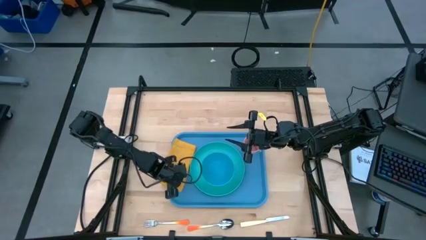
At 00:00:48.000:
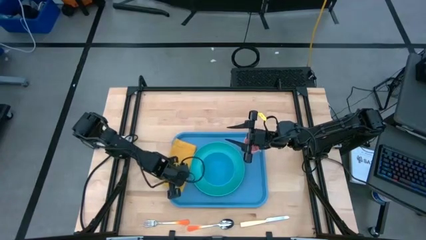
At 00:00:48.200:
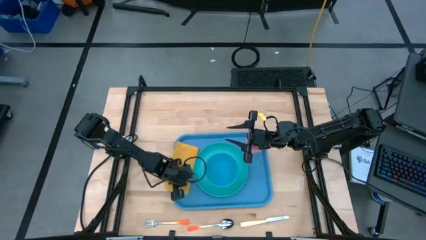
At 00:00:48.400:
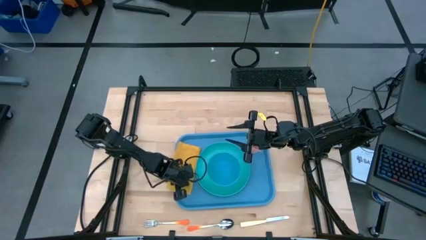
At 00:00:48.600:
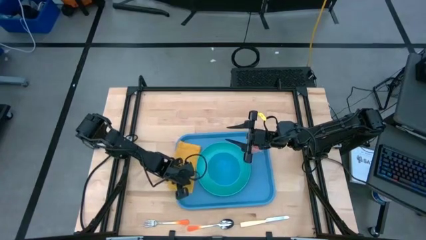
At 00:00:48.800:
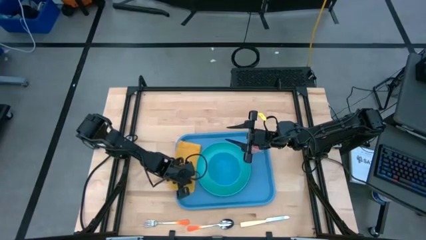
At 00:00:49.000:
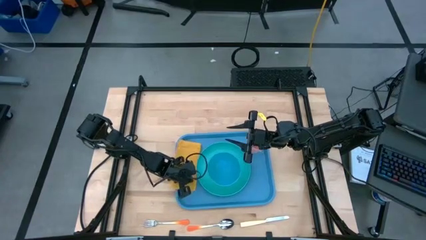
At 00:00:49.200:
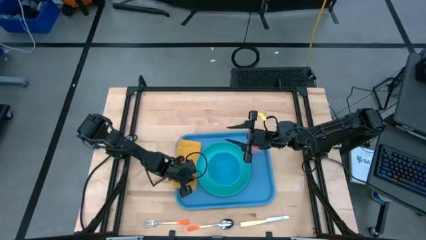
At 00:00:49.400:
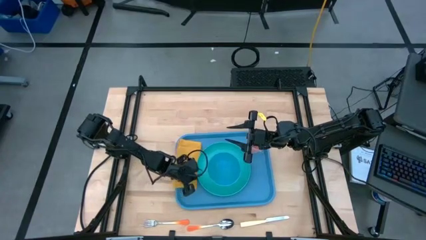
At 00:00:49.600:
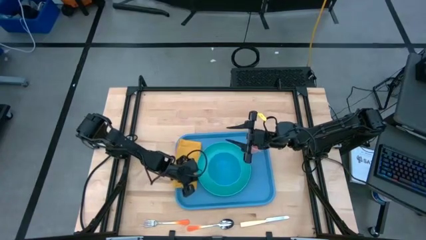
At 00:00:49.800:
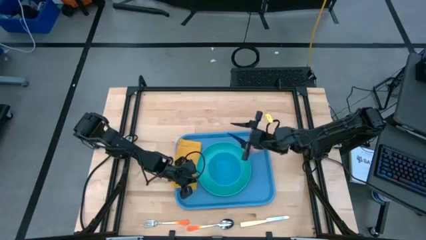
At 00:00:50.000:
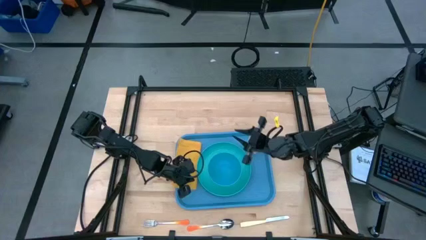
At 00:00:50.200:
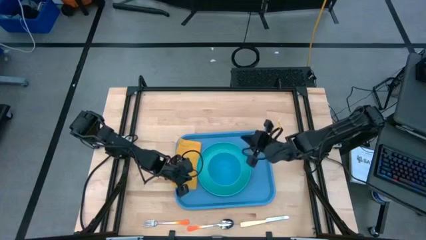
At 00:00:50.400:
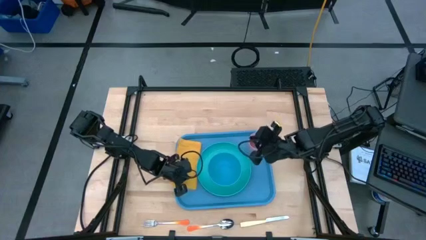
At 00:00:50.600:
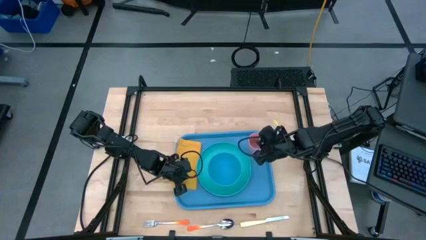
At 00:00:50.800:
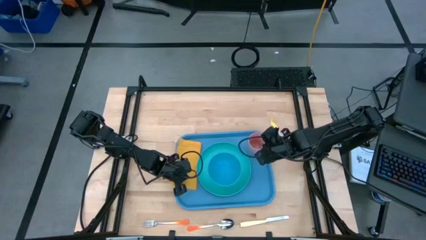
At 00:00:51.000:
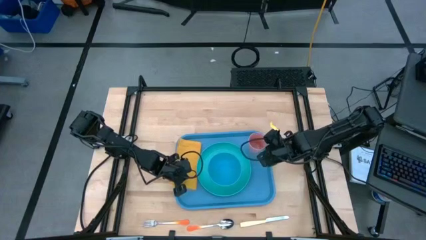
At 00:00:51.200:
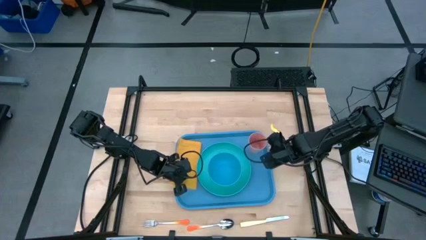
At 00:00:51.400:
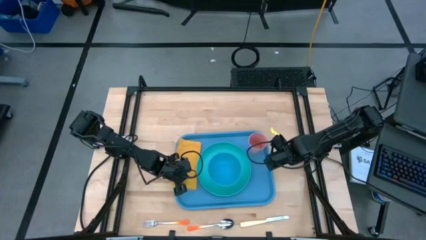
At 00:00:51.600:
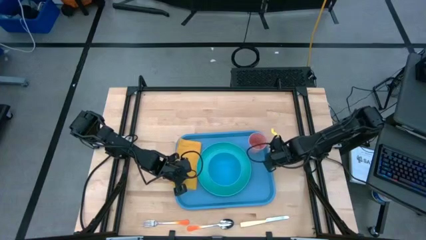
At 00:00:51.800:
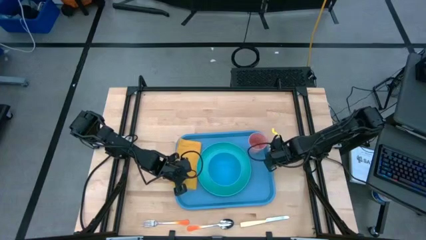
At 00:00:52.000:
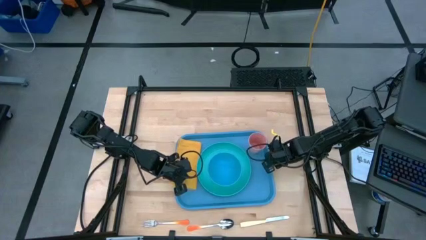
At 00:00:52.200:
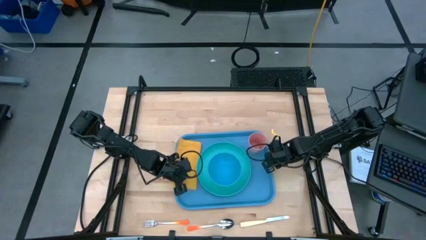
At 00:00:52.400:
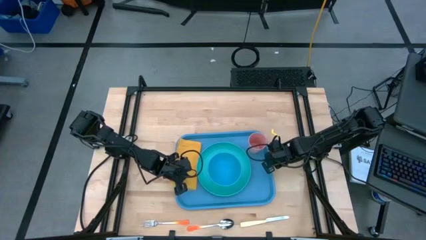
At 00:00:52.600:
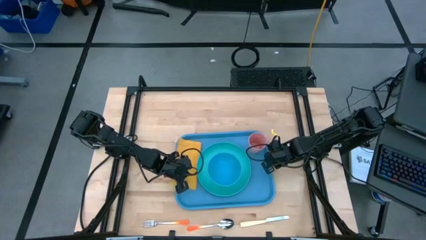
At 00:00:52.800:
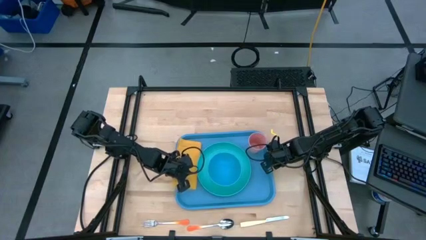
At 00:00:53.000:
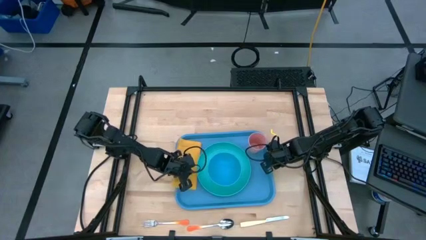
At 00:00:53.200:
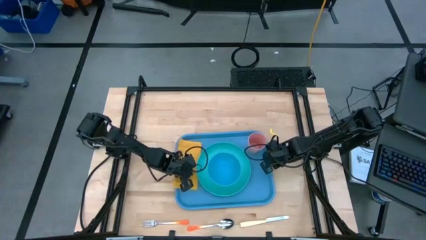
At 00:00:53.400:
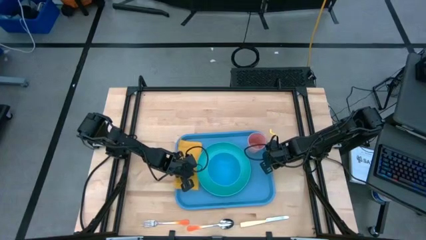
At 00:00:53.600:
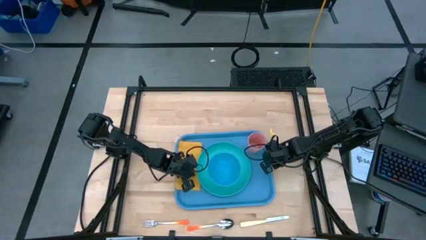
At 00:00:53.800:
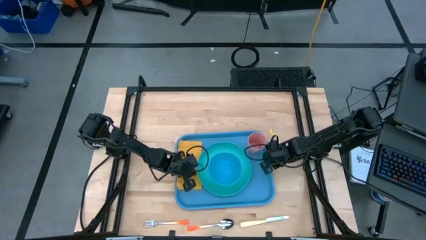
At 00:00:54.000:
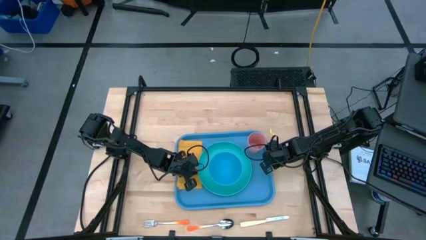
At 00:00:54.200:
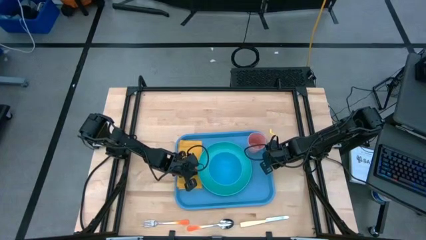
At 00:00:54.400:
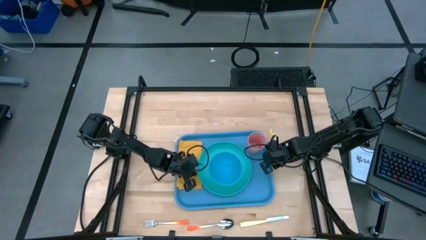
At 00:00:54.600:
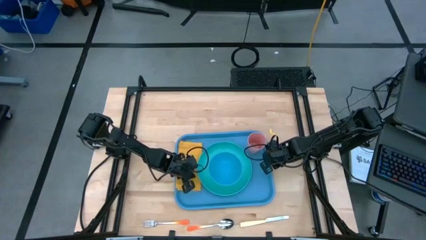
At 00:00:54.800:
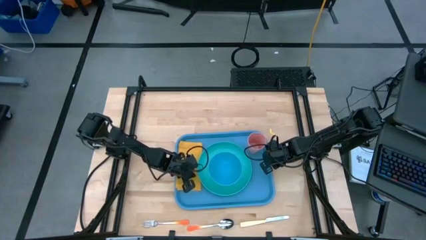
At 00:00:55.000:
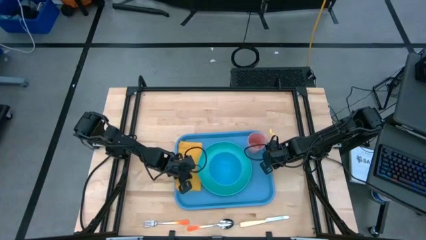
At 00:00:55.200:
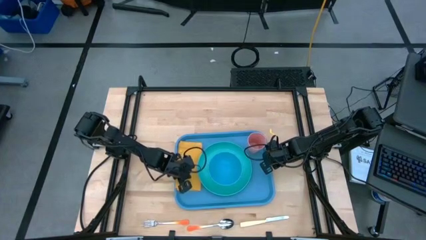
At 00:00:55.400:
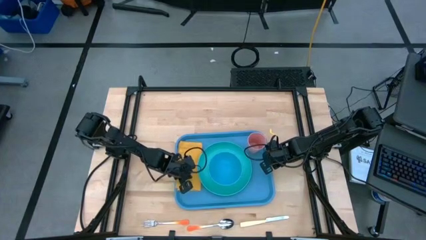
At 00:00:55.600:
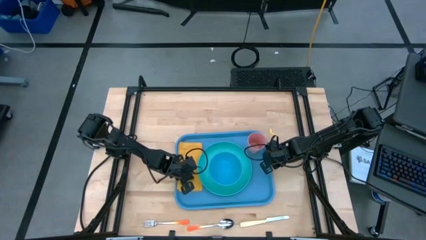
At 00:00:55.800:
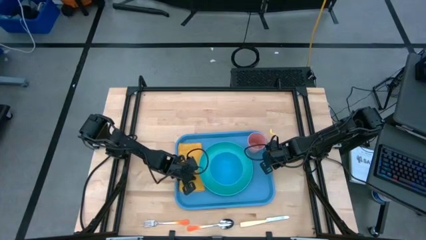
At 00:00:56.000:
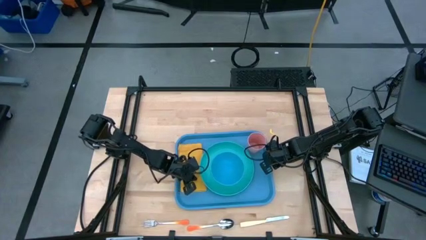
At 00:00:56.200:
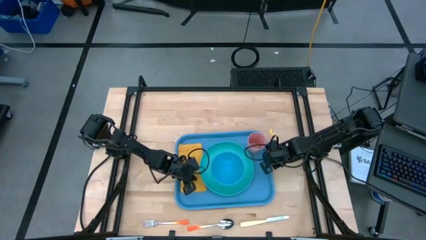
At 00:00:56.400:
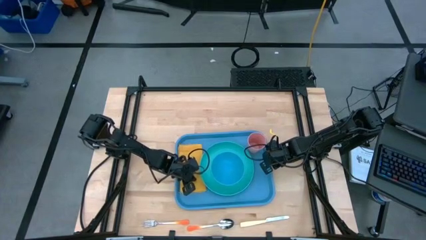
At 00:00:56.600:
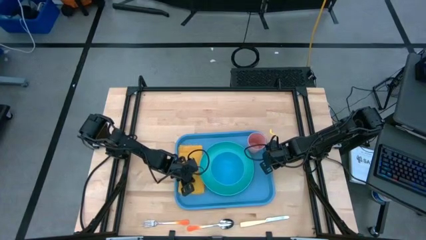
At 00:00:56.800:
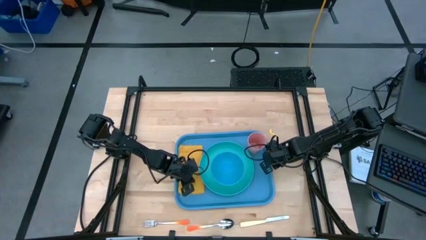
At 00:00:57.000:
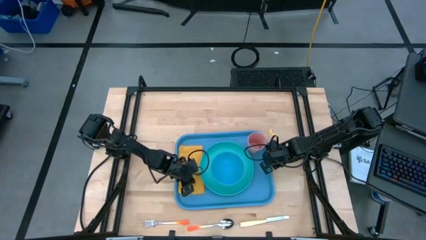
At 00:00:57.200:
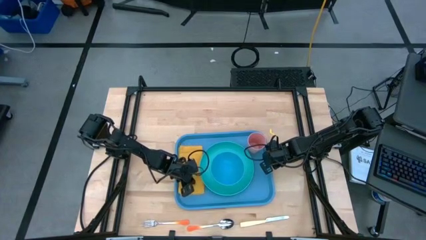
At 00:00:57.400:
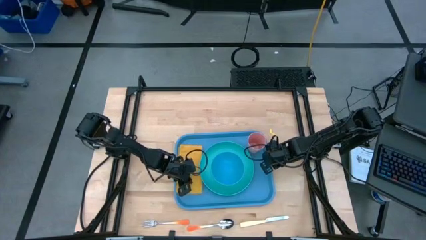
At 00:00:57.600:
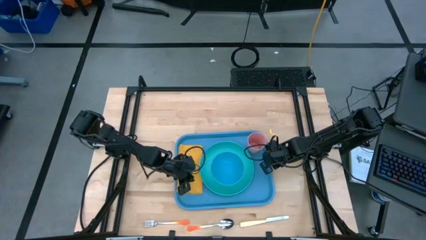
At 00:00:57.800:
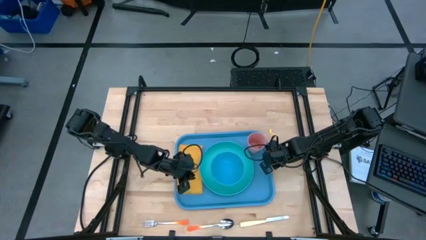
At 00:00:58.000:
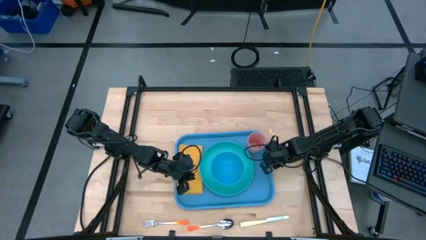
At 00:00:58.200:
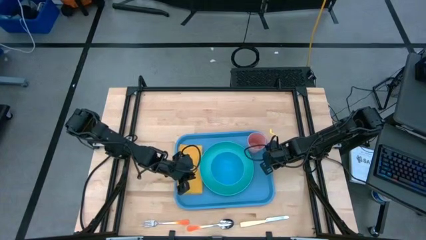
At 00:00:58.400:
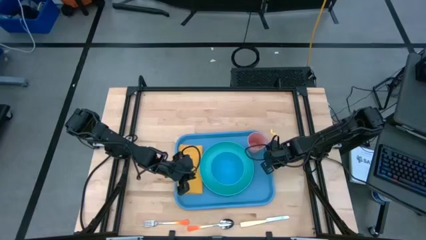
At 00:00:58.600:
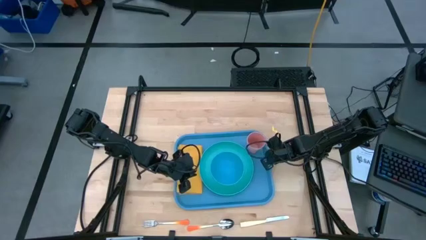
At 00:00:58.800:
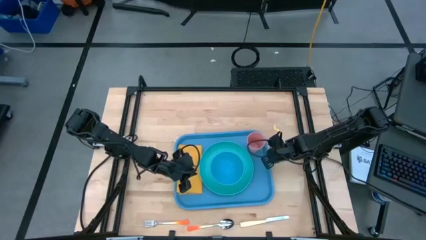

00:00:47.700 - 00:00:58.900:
Task: Set up tray
Put the yellow napkin to the left of the blue tray

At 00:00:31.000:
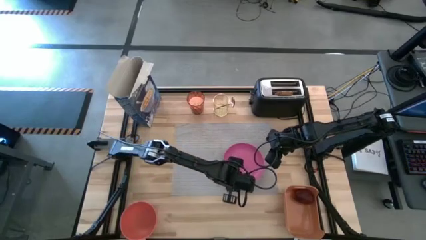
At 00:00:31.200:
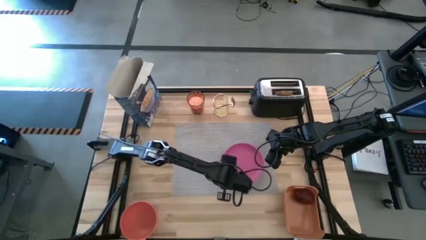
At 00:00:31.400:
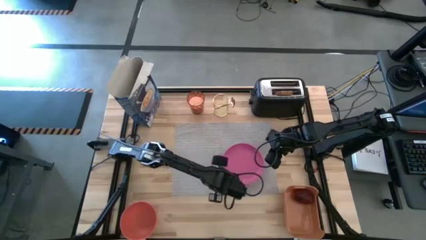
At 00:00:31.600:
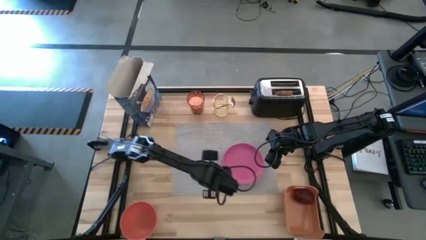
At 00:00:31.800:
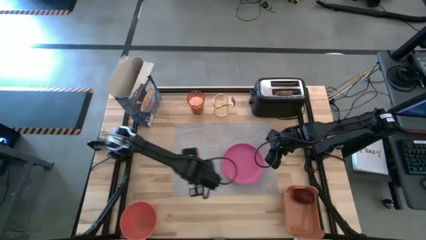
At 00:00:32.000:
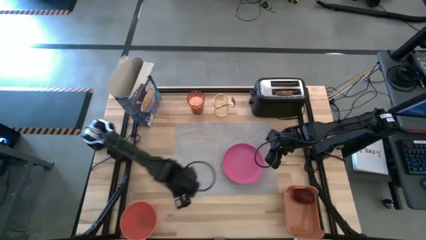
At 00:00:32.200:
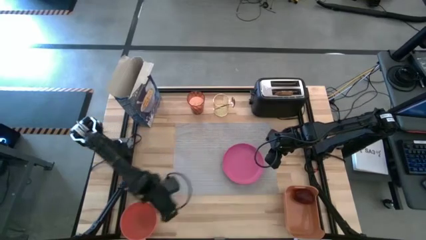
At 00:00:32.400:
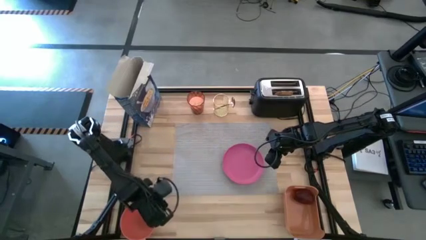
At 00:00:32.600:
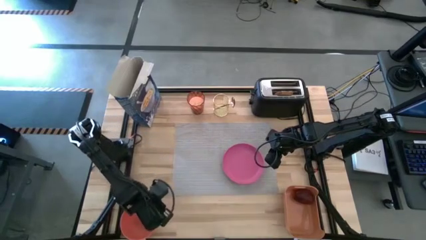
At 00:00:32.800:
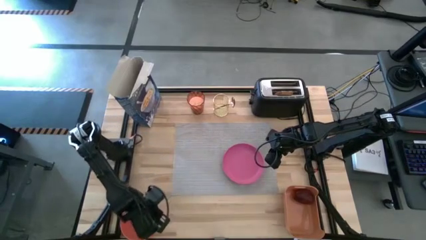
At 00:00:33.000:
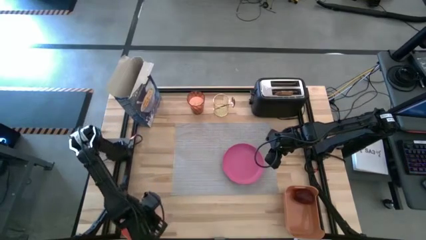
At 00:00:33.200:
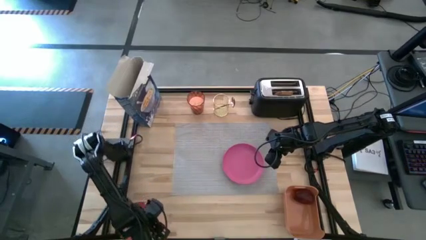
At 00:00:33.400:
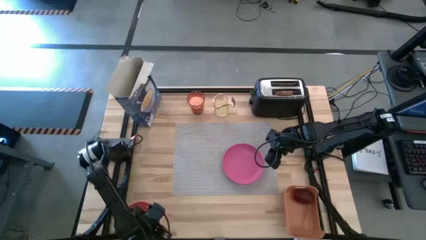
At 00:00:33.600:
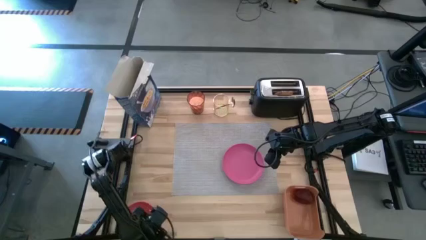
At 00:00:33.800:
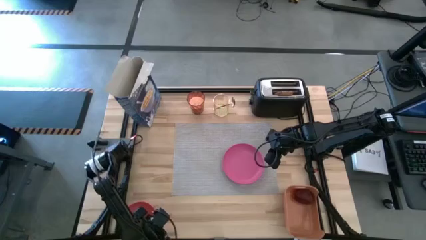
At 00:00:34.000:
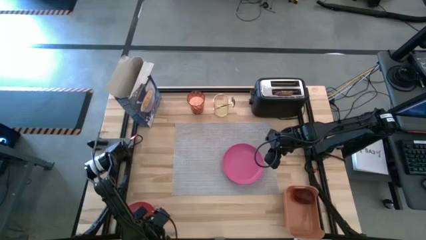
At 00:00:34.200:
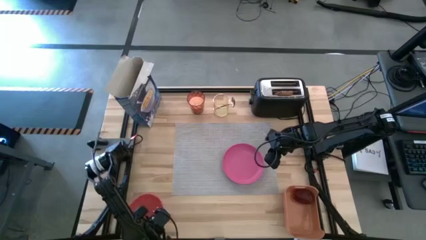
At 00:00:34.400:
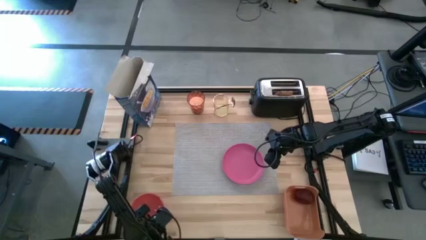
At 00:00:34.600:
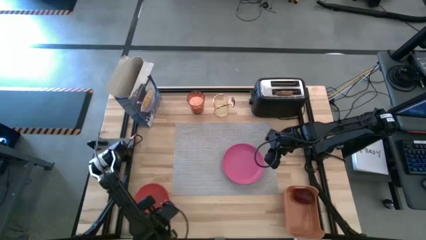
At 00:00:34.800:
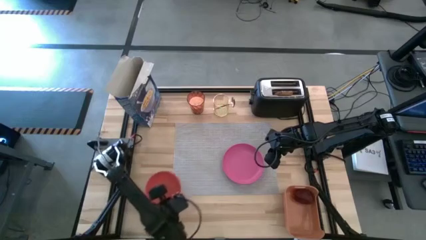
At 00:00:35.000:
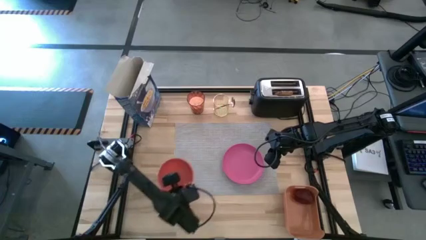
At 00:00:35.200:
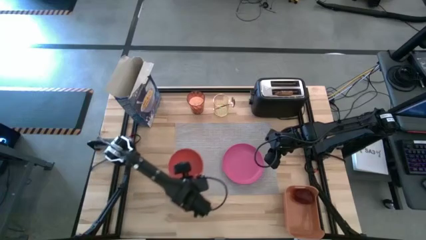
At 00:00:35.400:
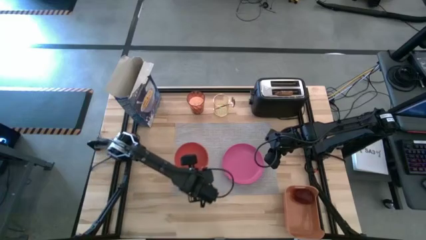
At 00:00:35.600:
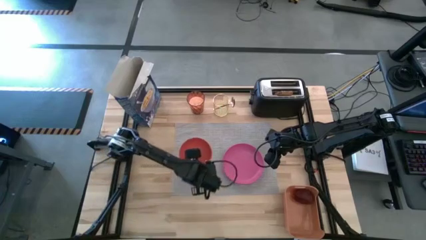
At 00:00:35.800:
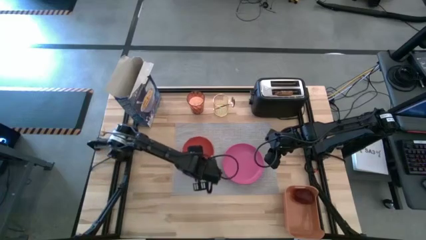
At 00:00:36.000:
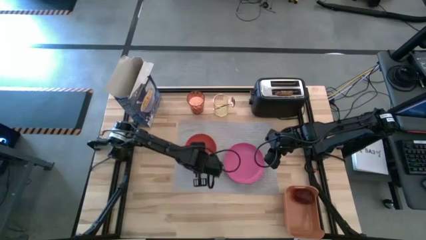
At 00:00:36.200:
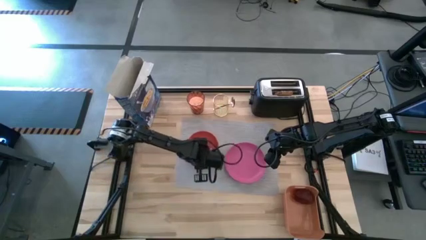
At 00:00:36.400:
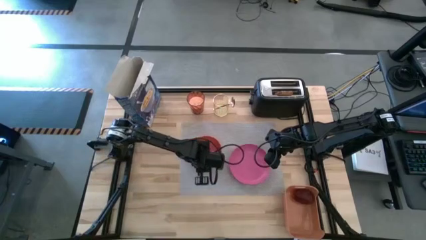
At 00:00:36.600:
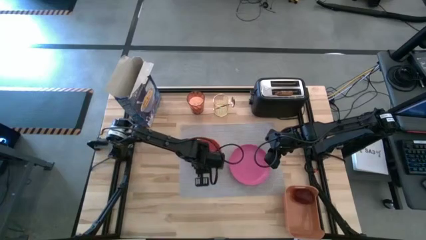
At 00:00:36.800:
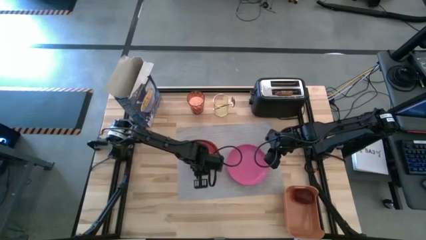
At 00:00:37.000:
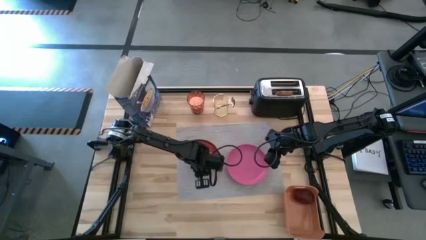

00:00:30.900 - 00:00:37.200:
Task: Arrange a breakfast setting
Put the orange bowl on the gray placemat
